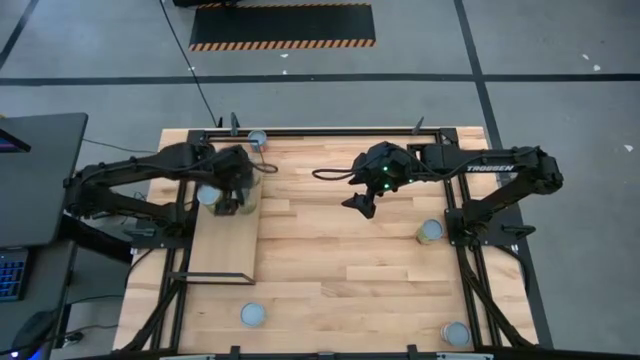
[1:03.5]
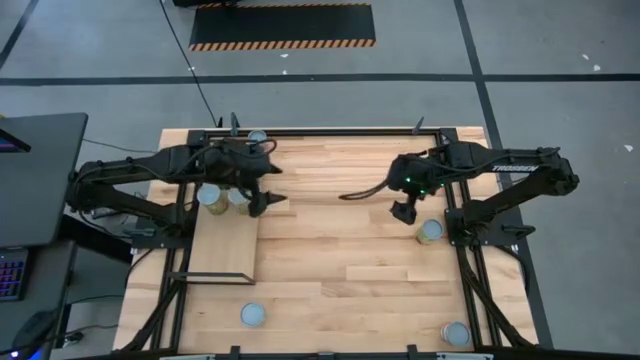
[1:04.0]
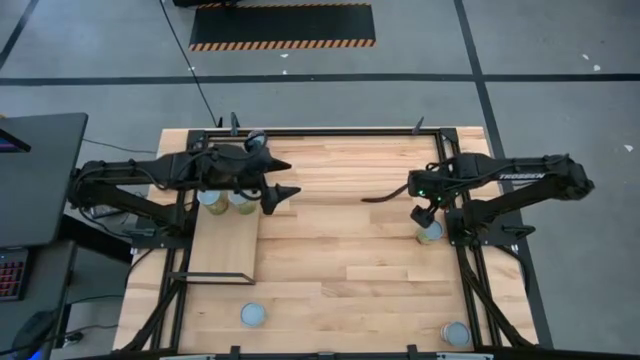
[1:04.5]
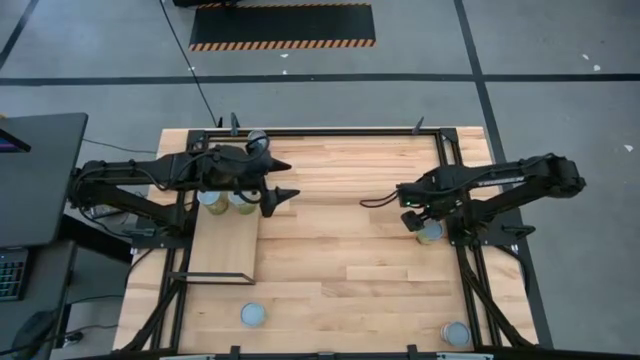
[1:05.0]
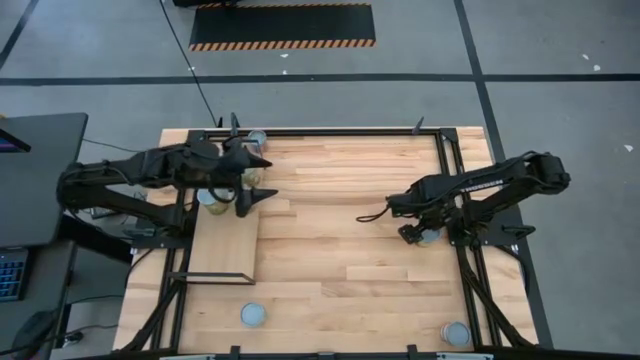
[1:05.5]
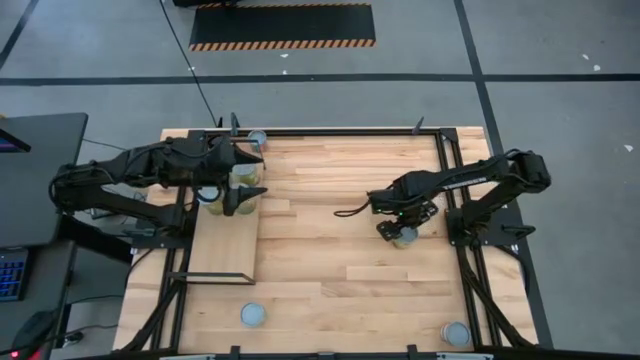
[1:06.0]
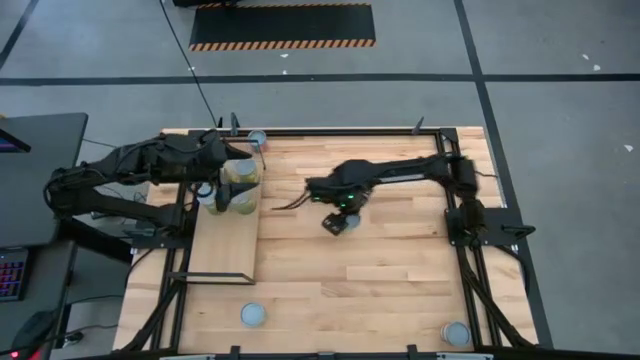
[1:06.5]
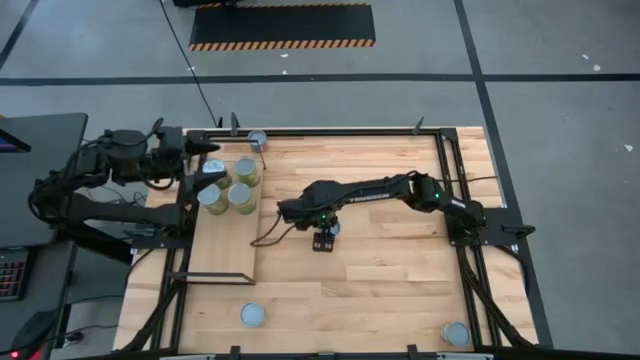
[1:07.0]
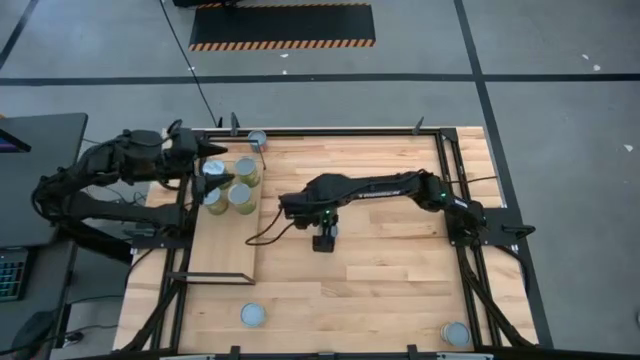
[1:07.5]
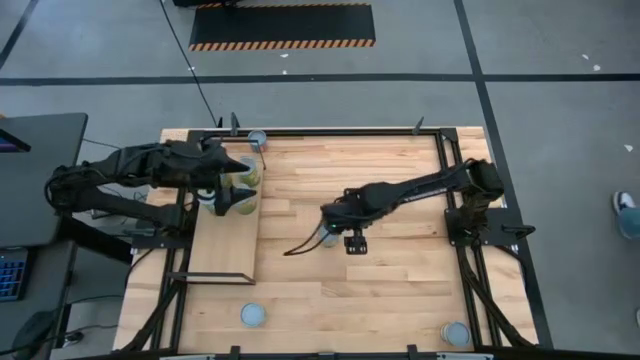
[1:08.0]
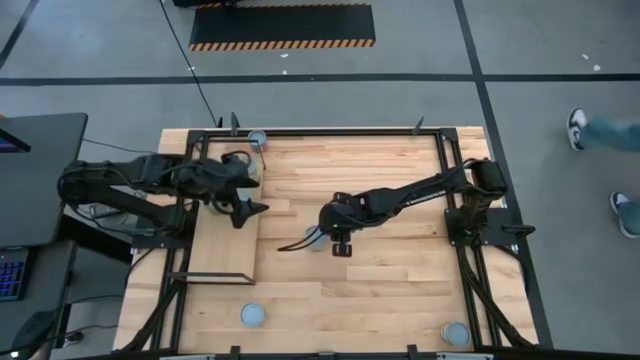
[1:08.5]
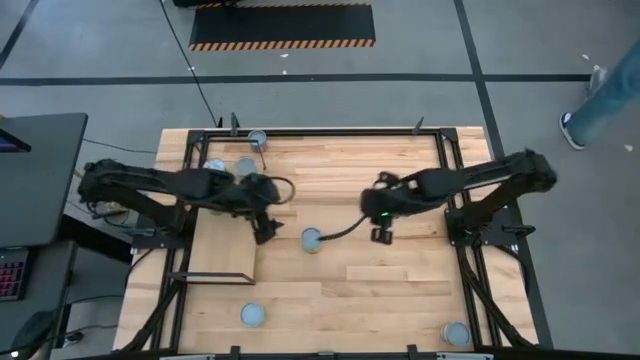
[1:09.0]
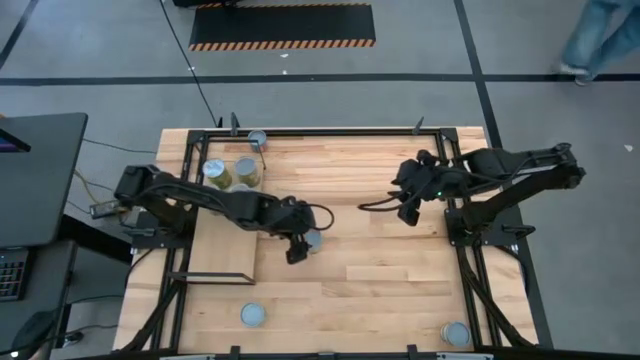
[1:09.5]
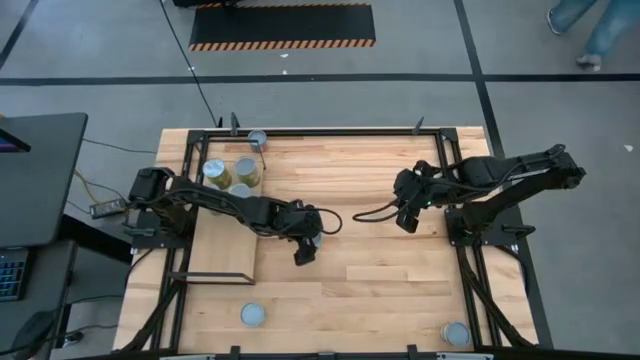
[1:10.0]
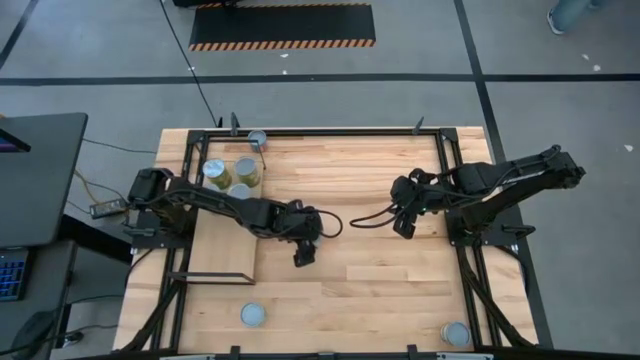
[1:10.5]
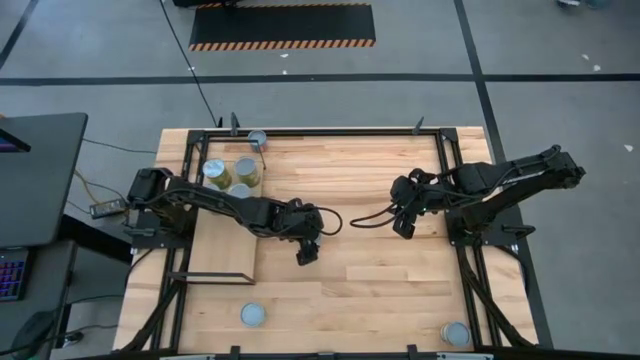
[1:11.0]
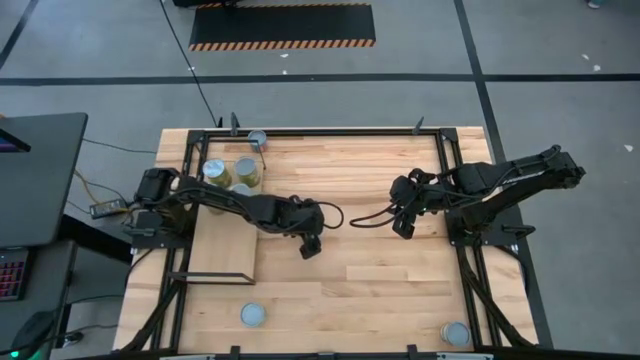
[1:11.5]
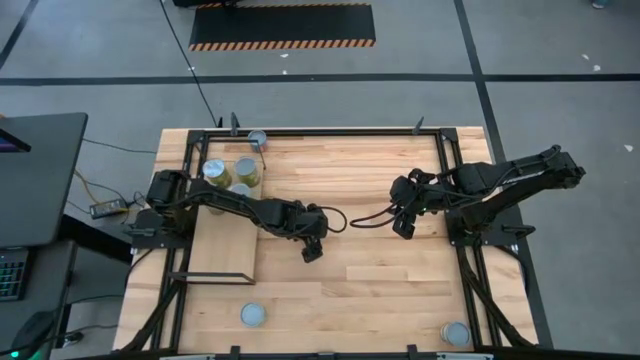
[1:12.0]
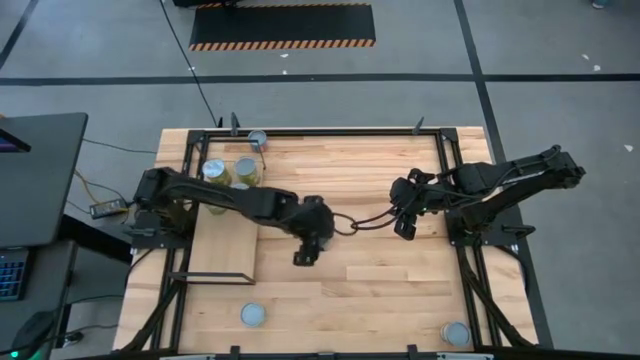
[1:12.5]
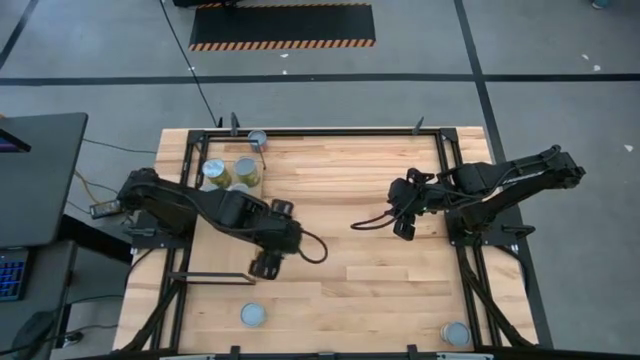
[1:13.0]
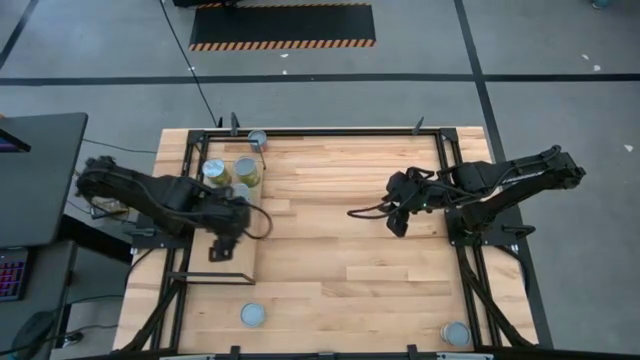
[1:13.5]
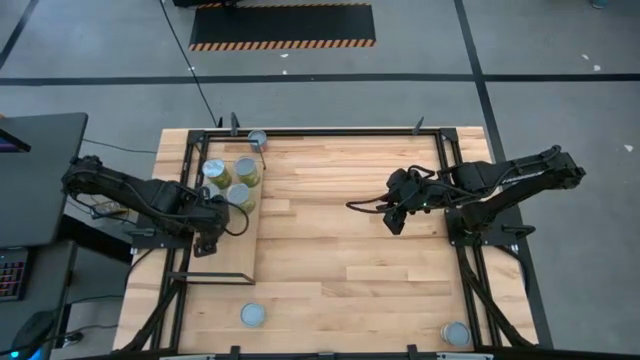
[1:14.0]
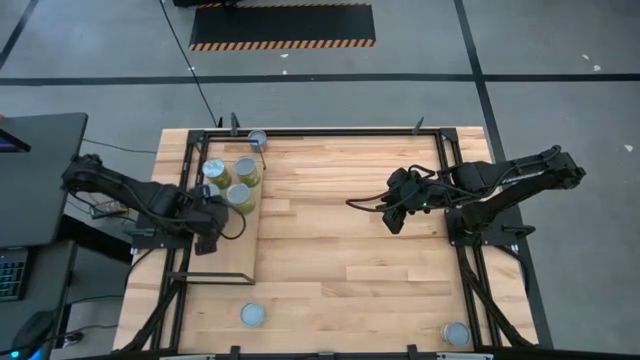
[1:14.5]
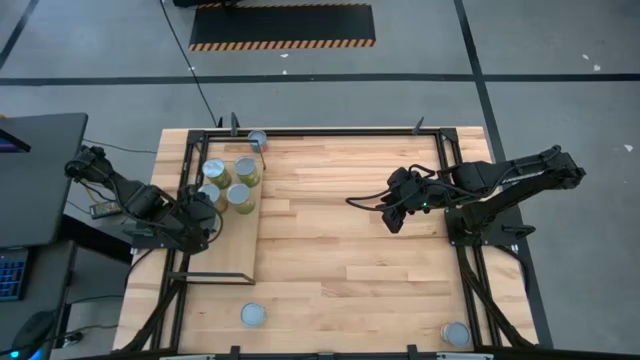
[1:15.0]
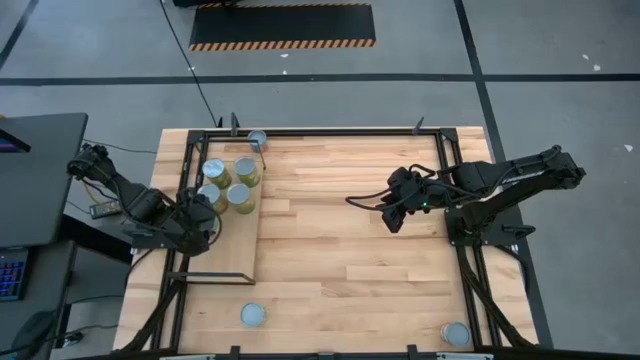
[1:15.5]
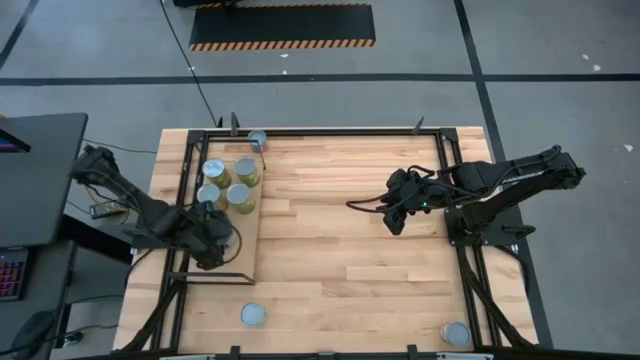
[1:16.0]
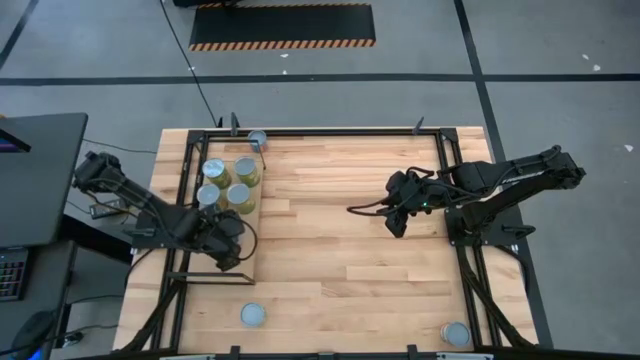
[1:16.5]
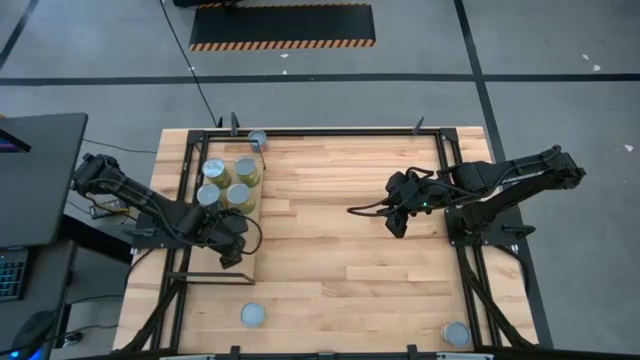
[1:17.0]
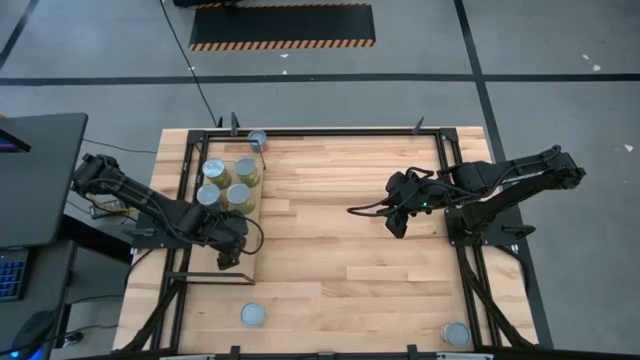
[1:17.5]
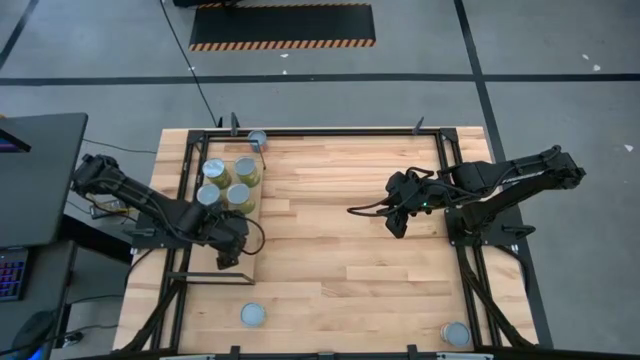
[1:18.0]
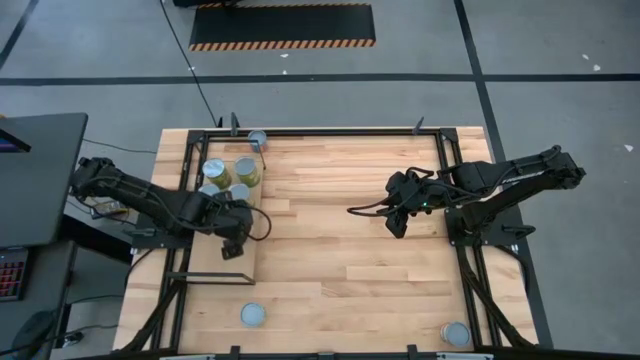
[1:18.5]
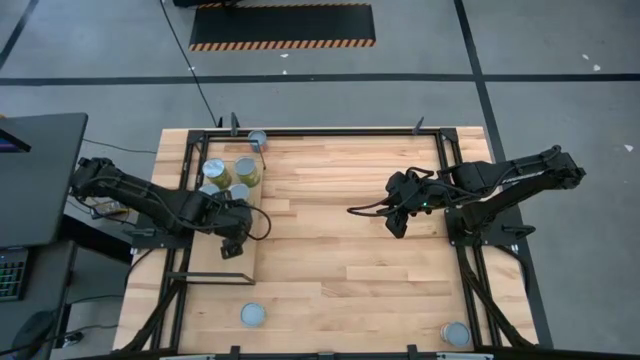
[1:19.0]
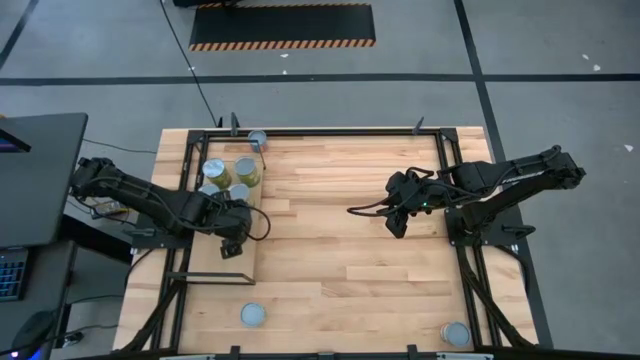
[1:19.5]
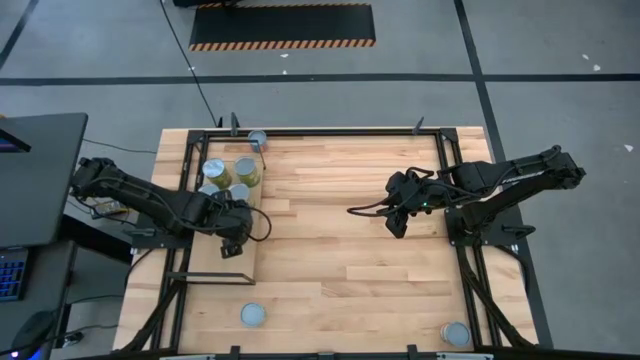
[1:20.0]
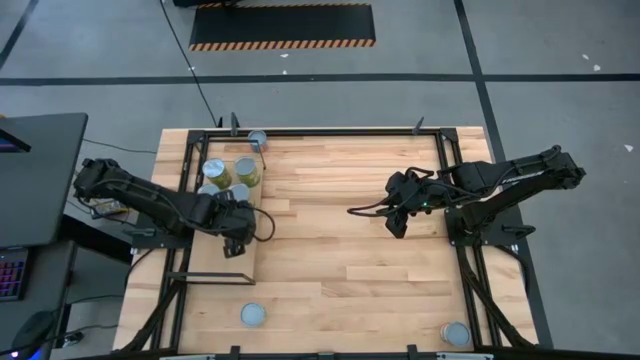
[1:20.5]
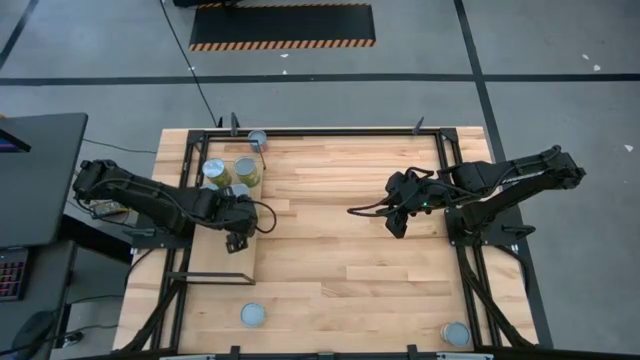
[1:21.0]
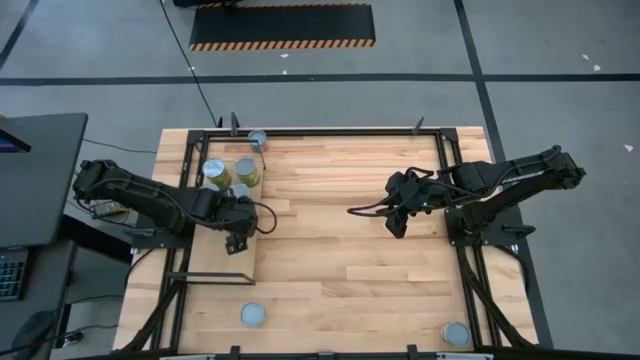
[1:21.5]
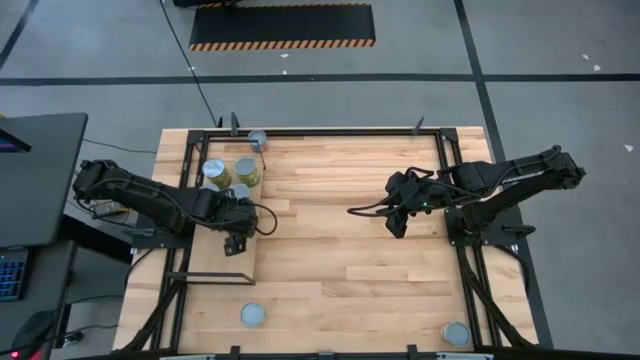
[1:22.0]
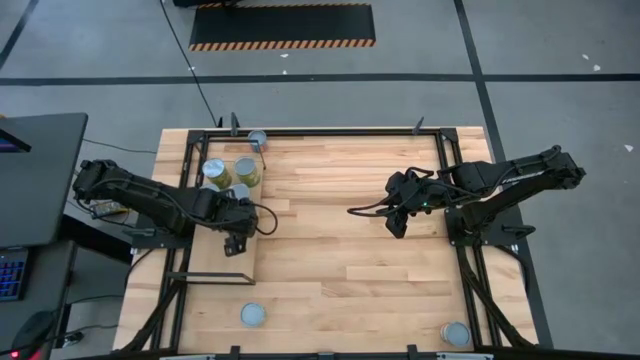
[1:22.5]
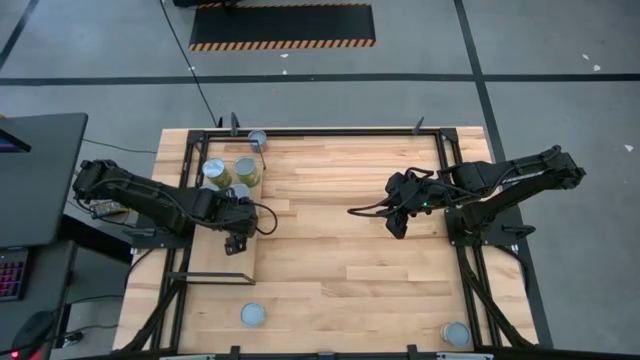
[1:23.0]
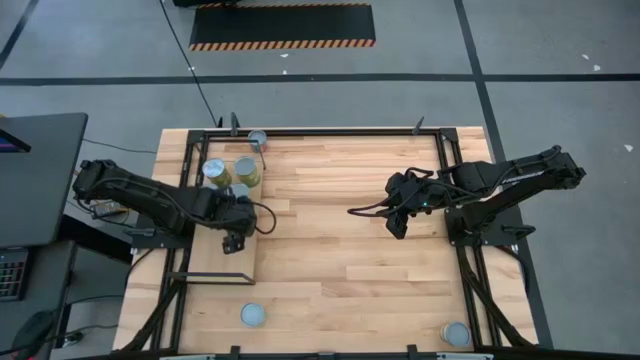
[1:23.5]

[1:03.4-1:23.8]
Task: Pick and place cans onto a shelf
Put the canned spaghetti sauce on the shelf
